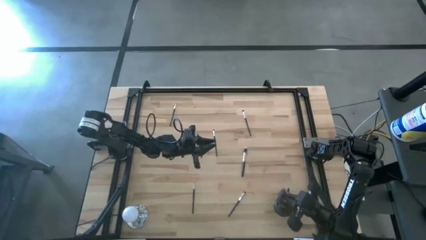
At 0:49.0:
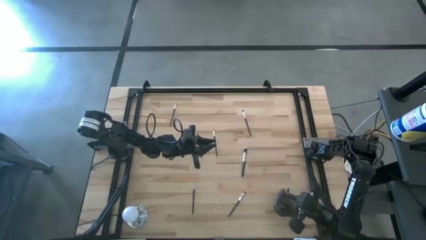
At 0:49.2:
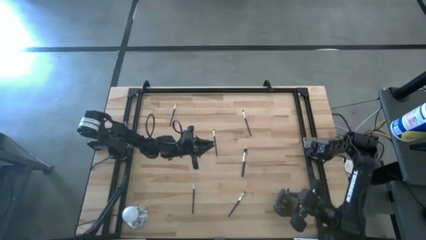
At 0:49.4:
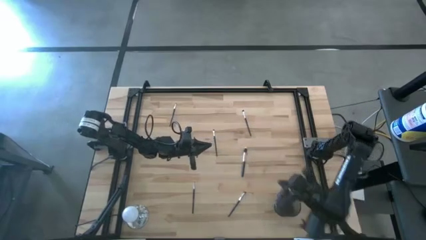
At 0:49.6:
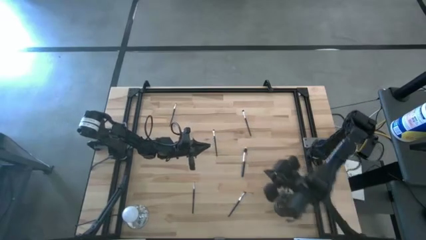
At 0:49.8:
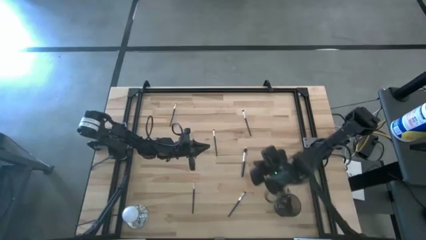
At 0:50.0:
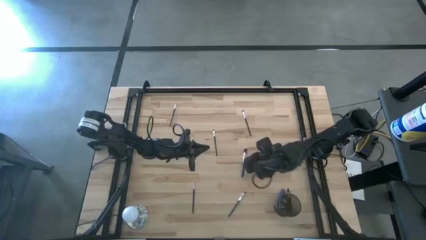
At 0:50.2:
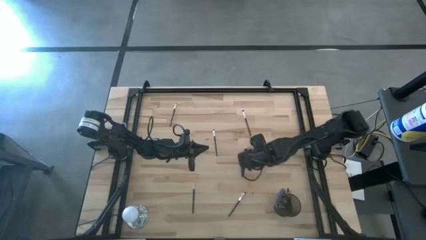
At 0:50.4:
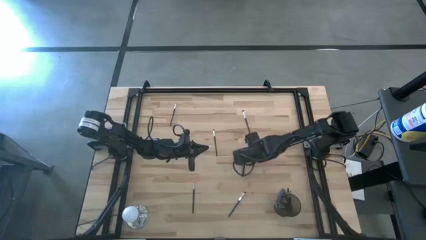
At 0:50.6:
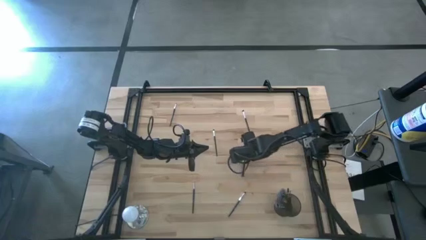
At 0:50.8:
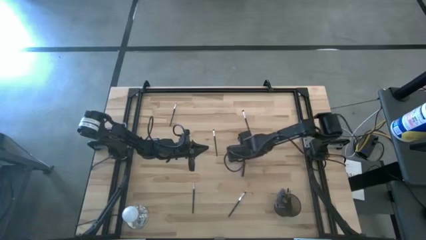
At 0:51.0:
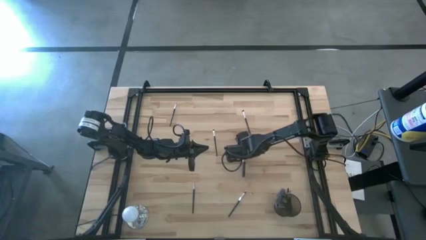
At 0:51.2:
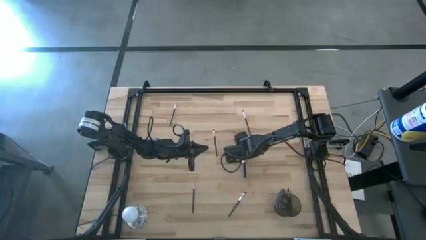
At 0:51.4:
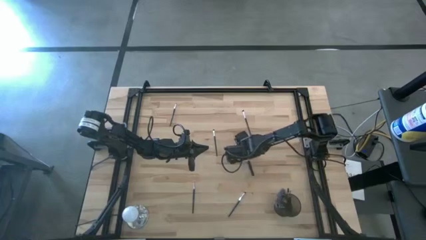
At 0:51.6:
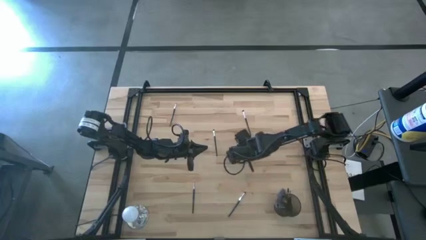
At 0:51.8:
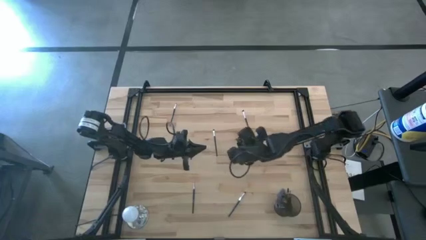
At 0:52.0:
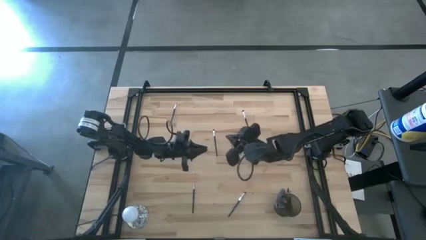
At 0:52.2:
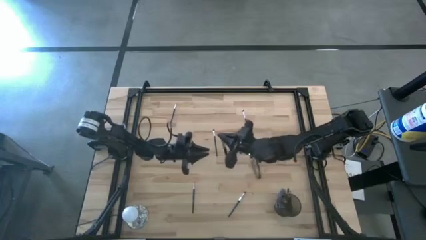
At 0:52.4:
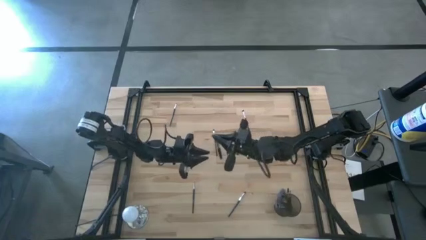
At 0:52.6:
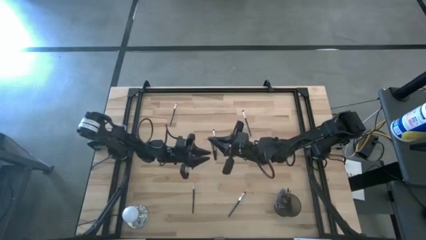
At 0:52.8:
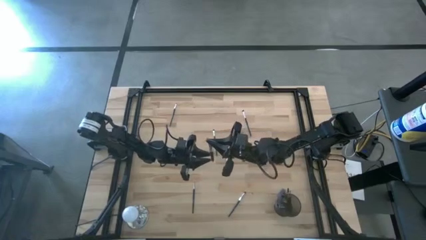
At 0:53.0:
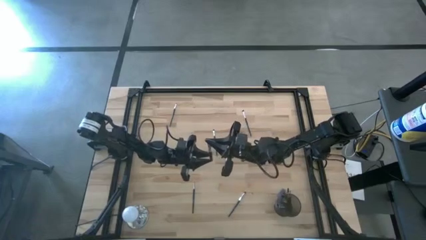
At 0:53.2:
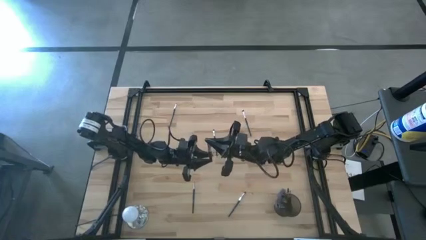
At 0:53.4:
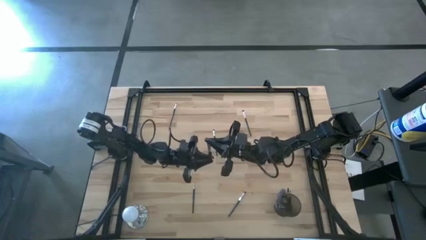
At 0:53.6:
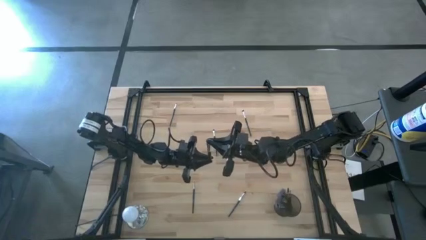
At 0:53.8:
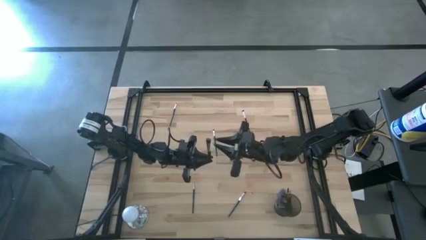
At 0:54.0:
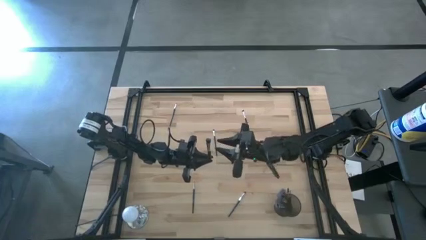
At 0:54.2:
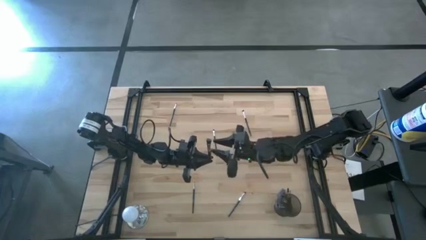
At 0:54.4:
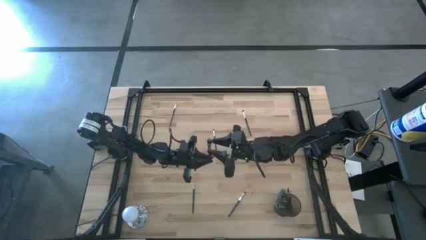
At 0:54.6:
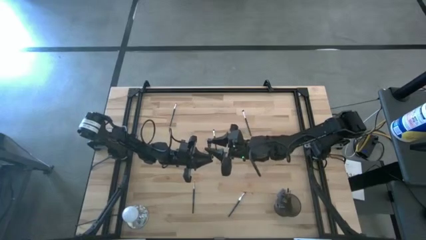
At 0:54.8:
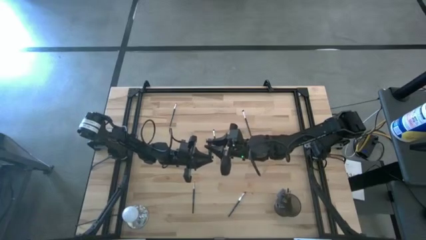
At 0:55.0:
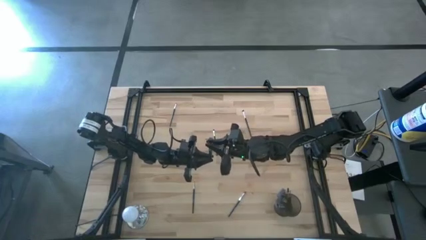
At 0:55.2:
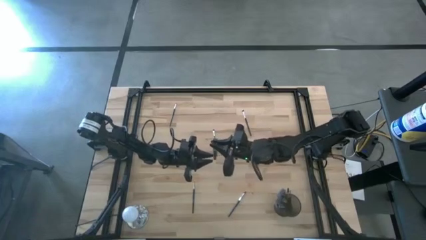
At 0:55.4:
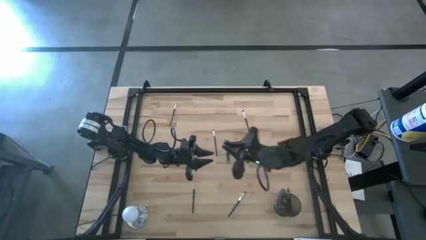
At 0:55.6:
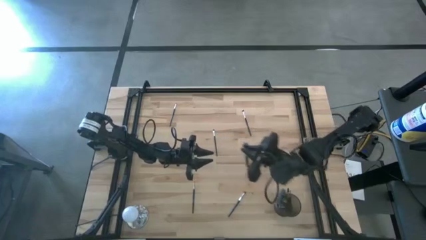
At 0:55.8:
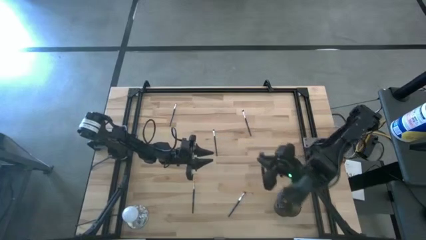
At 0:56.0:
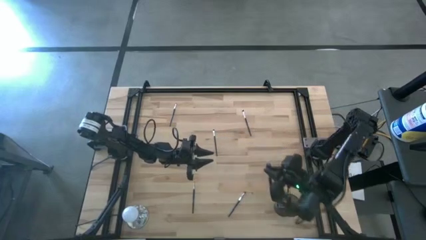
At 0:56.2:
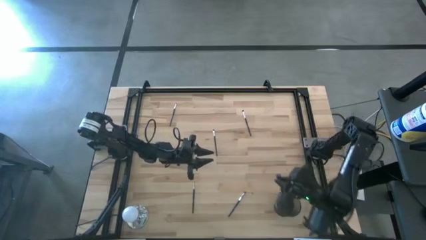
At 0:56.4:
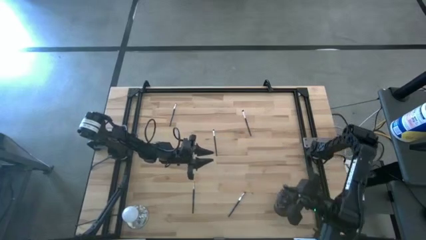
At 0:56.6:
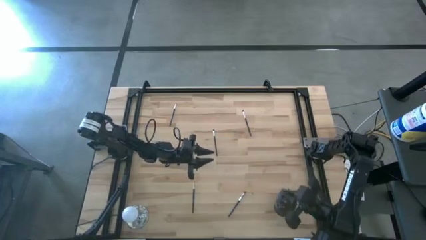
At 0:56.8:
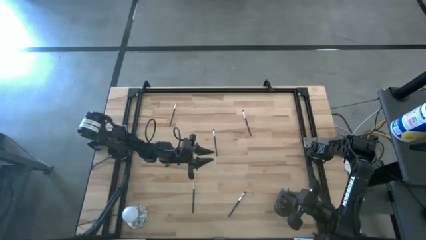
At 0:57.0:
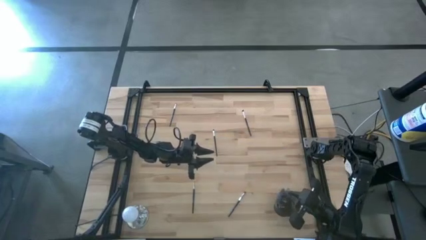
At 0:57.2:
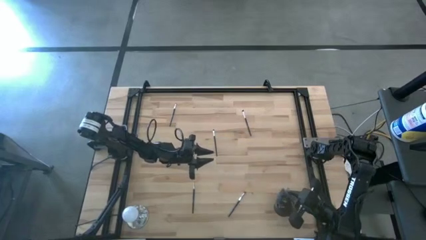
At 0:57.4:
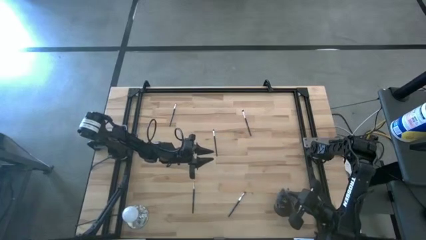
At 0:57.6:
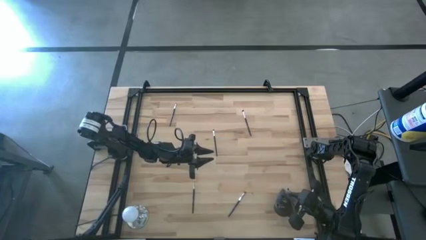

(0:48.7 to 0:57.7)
Task: Sort items
Put the foundation brush into the wire basket

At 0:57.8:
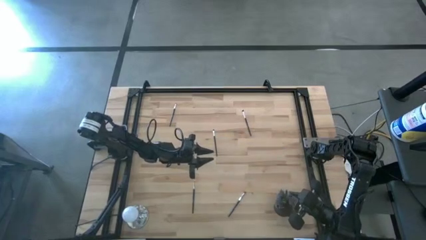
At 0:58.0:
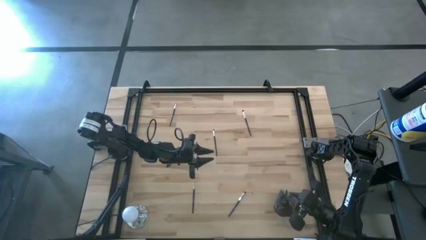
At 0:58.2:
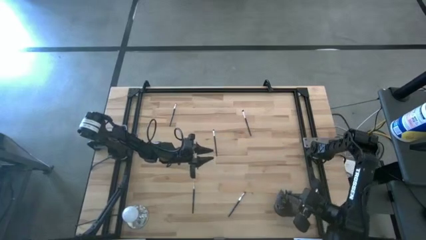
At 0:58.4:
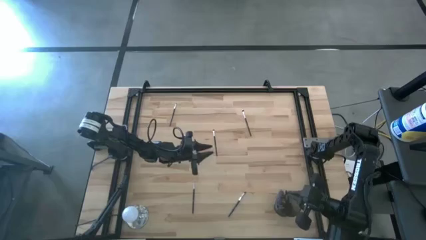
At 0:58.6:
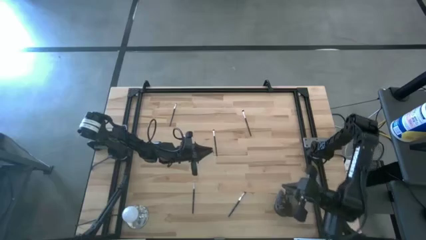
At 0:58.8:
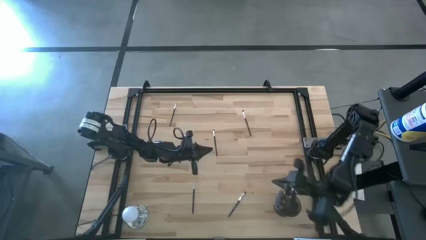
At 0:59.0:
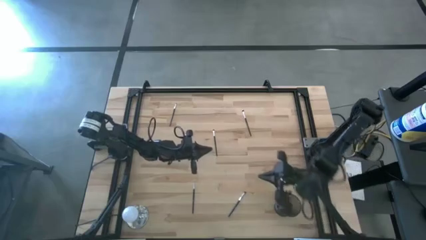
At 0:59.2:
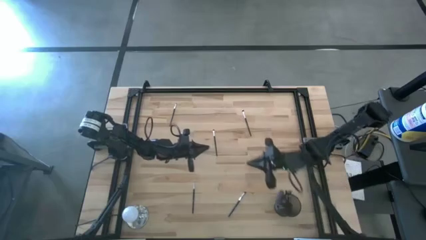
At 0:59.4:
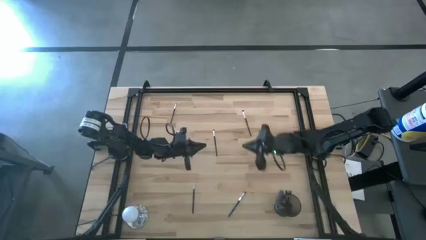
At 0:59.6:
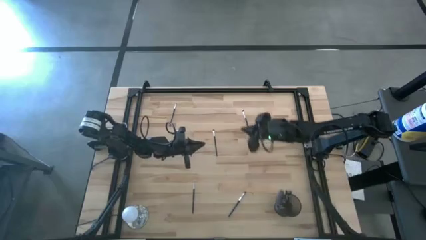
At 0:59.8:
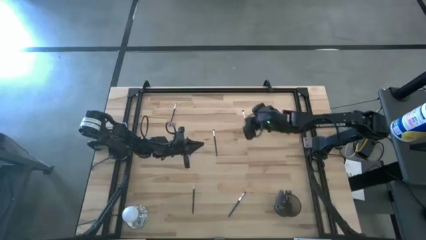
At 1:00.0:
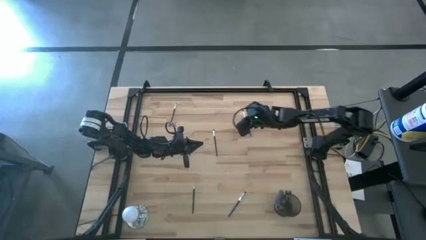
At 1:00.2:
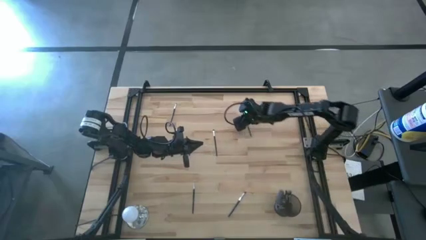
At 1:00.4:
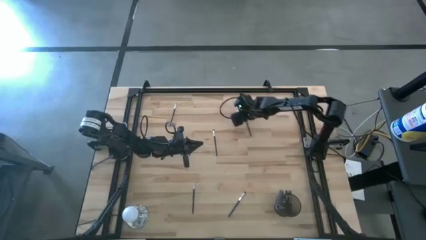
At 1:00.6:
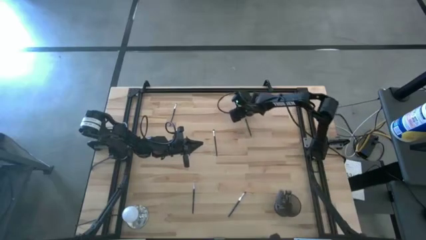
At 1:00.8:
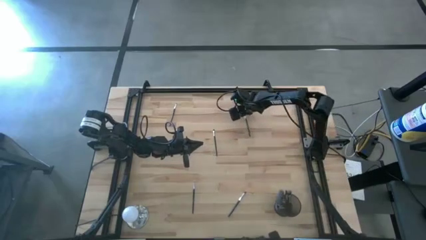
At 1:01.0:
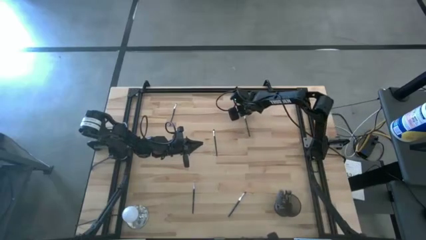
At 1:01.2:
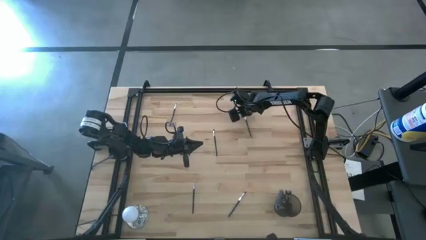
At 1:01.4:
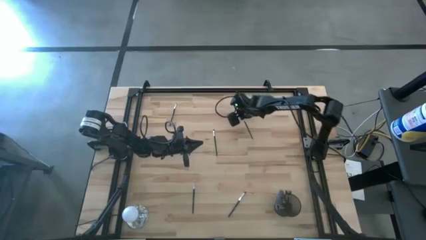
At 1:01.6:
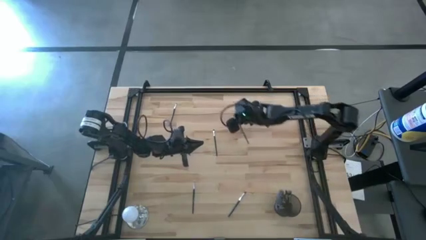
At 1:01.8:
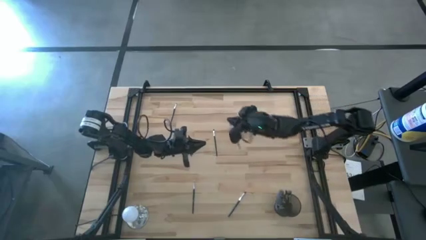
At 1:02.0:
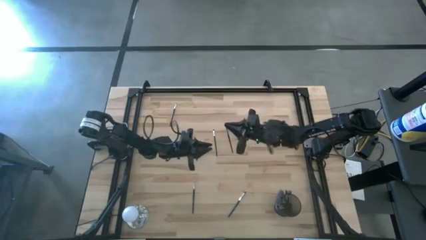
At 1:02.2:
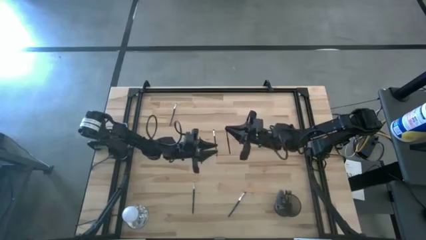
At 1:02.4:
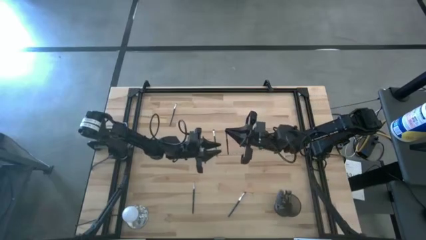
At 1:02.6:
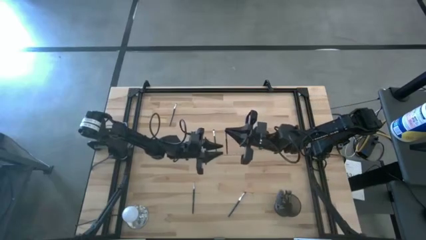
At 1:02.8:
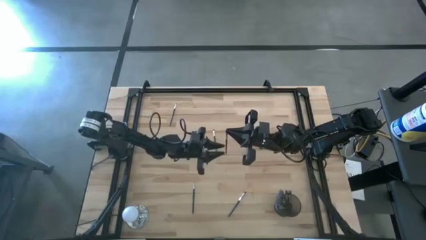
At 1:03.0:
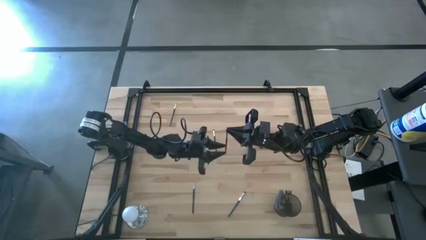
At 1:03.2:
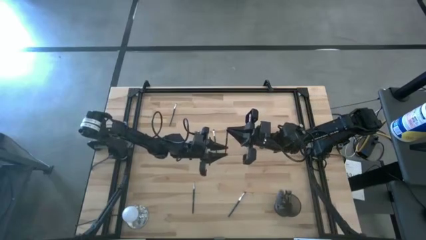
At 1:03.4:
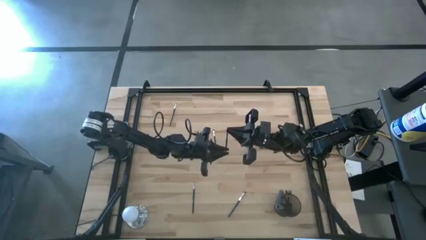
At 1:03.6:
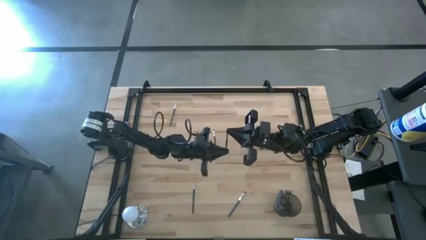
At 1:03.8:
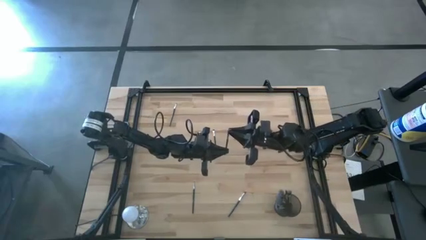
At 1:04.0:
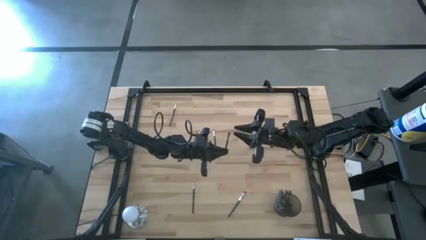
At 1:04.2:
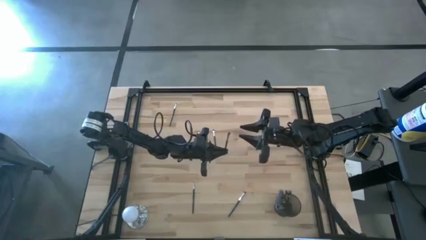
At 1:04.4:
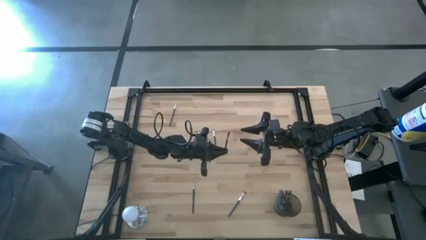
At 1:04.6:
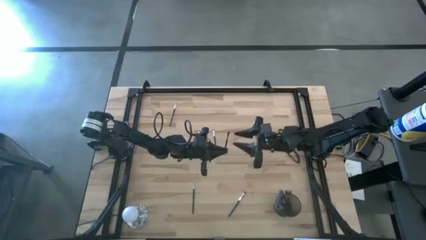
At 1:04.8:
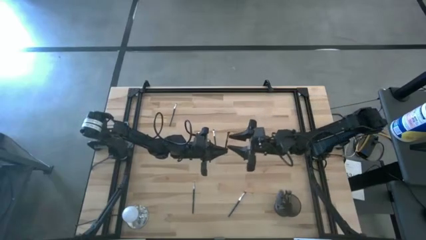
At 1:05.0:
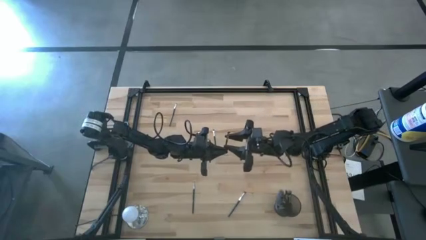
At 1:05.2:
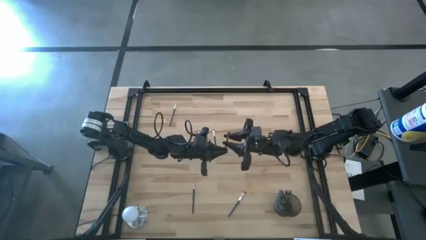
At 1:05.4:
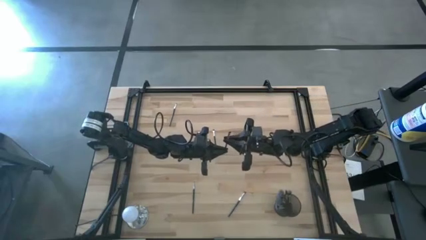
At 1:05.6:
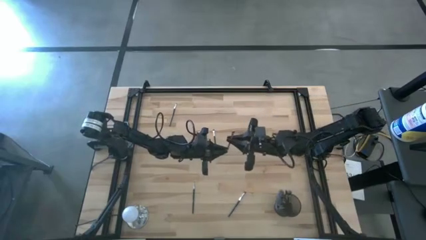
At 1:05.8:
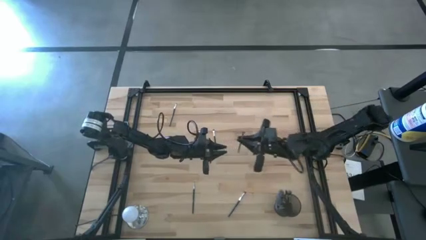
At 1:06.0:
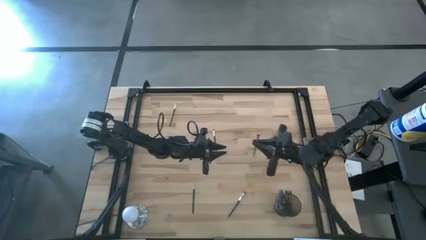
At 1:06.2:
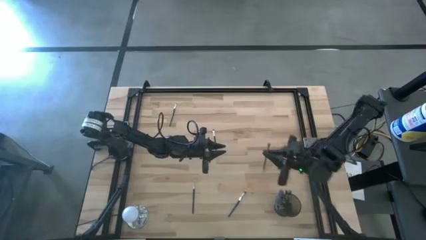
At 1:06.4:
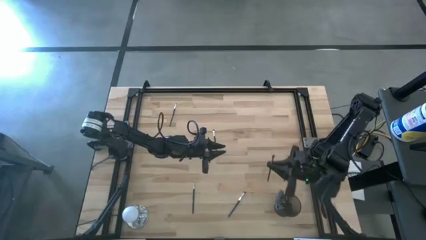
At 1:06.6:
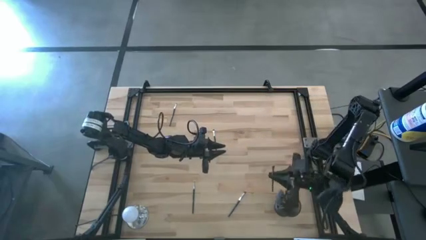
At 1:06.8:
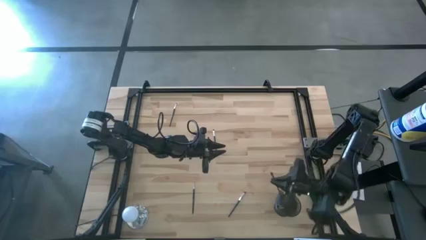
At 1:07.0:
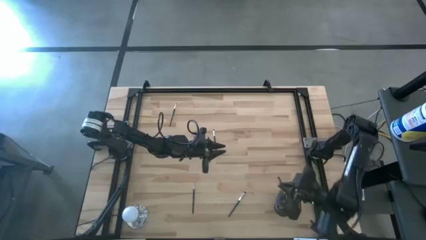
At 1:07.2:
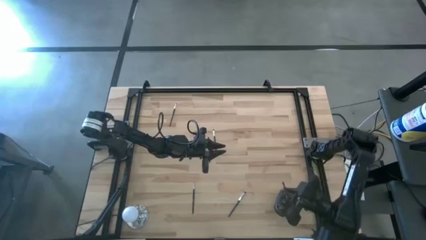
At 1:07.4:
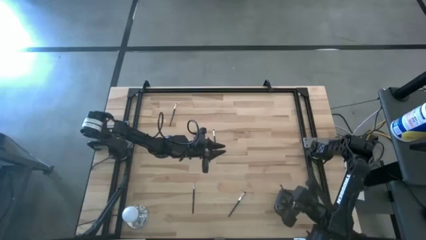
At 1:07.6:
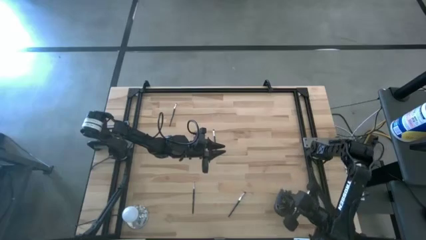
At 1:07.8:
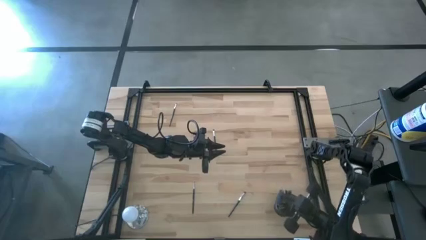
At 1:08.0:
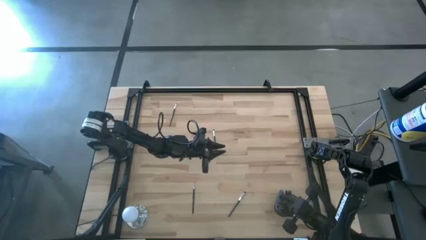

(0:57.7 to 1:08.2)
Put the medium angled shader brush into the wire basket
